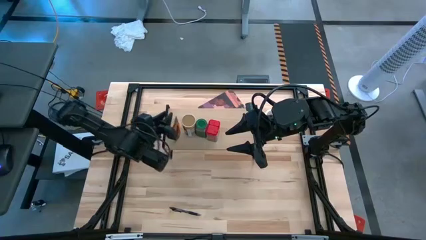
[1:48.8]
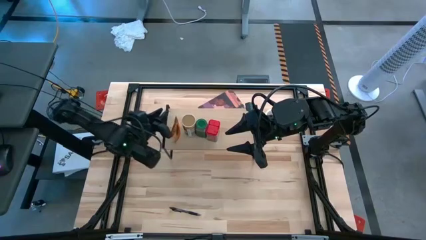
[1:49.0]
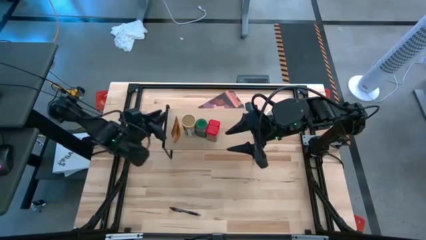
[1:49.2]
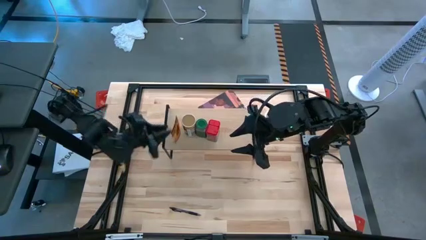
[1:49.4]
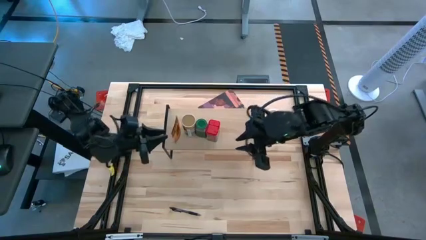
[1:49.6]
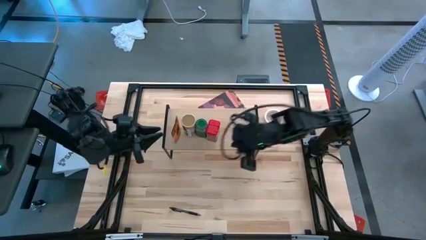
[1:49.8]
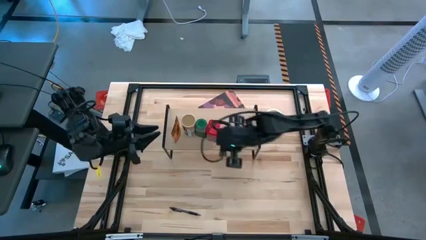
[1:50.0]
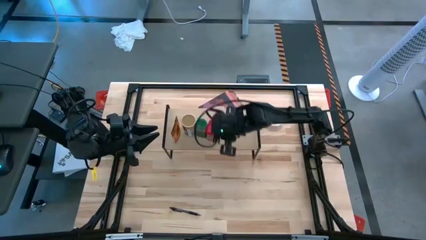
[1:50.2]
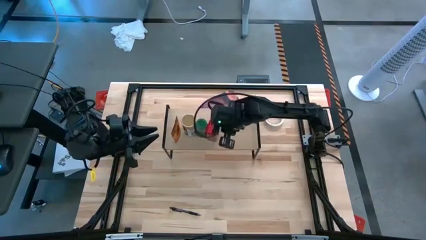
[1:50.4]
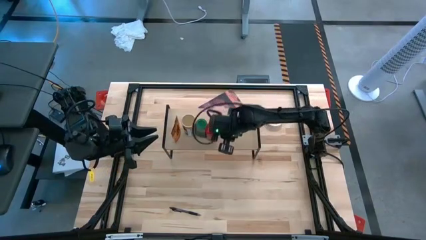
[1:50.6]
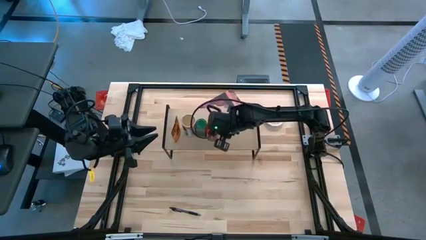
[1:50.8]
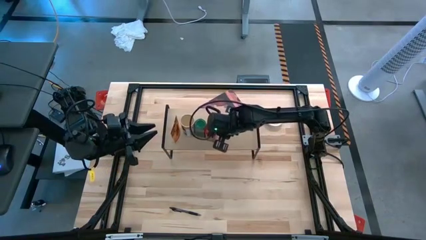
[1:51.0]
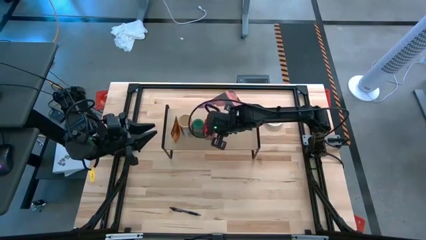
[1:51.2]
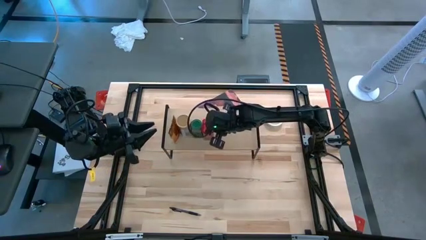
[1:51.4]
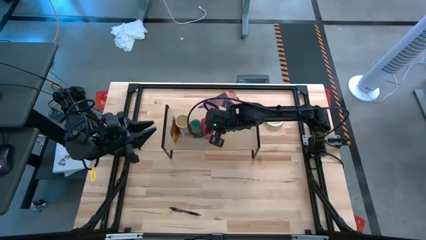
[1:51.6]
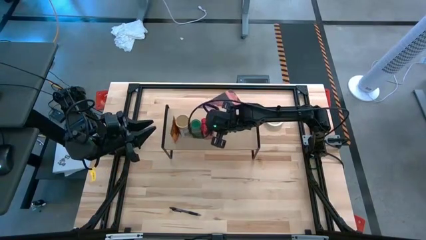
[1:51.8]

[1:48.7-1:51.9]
Task: Shelf spices
Adjust the seasoning bottles

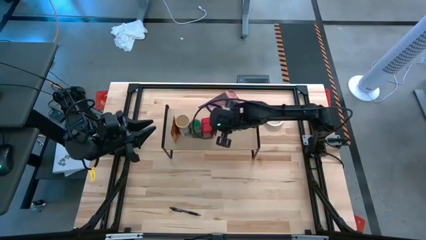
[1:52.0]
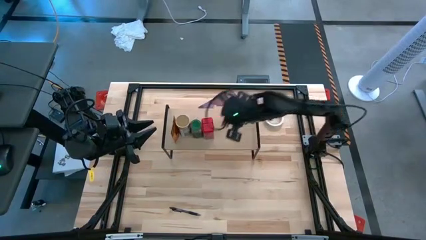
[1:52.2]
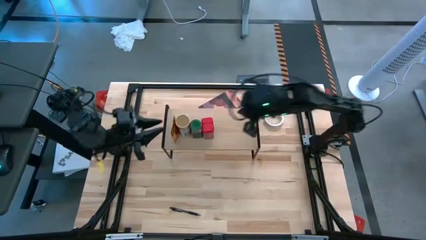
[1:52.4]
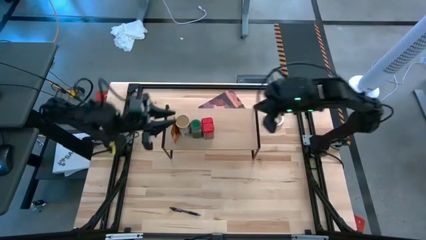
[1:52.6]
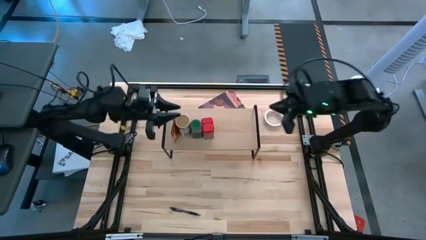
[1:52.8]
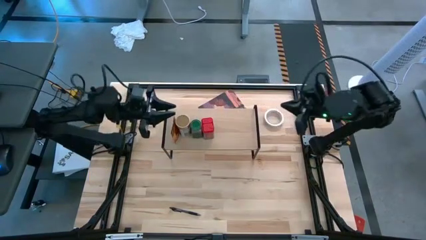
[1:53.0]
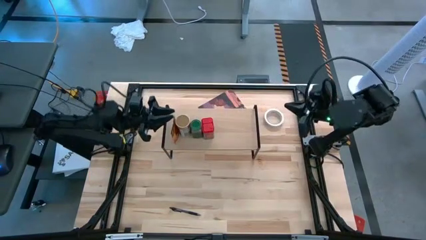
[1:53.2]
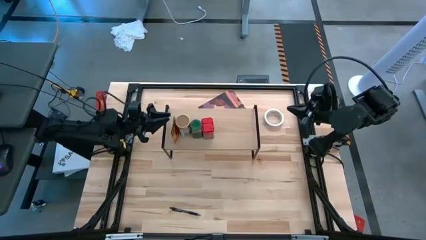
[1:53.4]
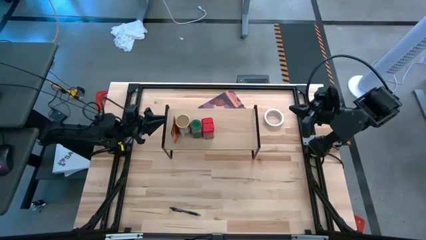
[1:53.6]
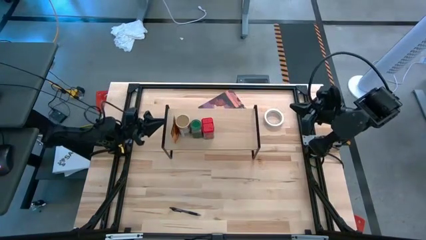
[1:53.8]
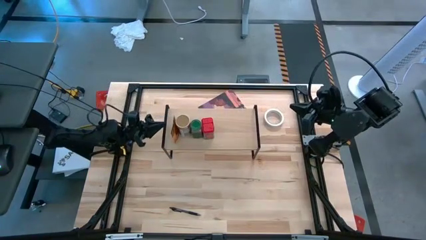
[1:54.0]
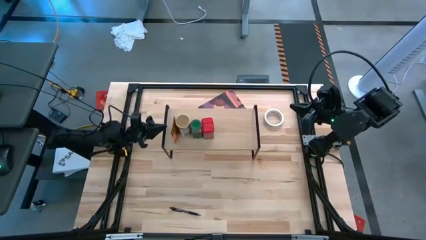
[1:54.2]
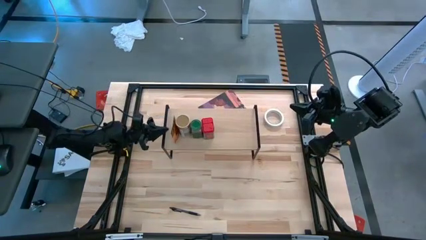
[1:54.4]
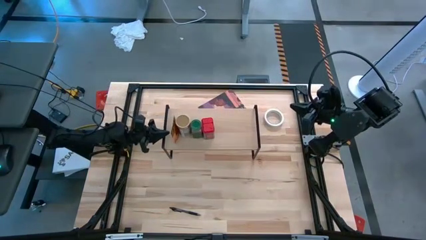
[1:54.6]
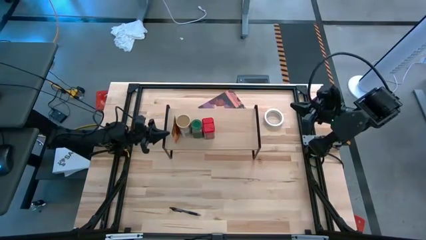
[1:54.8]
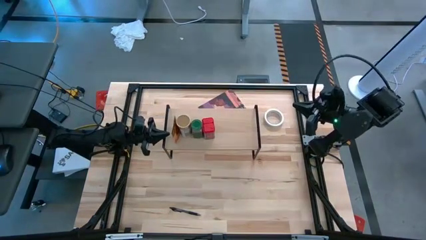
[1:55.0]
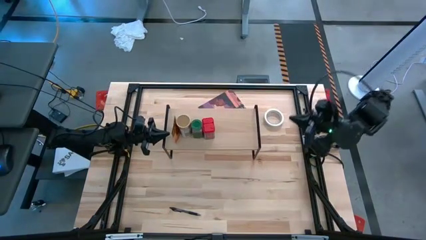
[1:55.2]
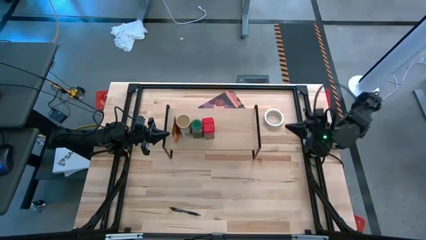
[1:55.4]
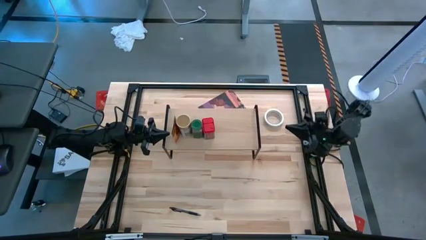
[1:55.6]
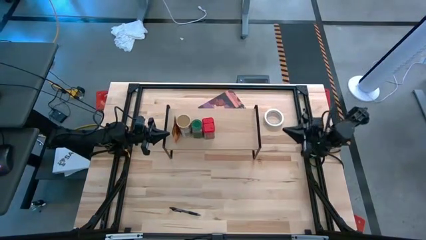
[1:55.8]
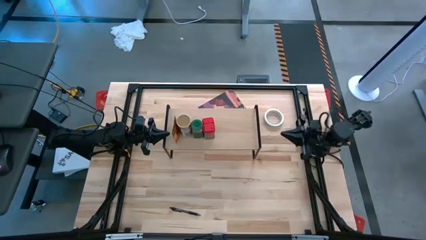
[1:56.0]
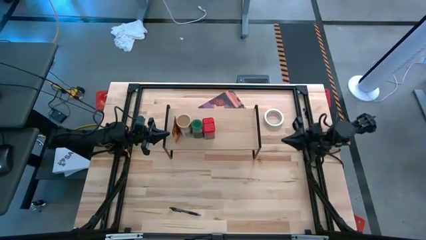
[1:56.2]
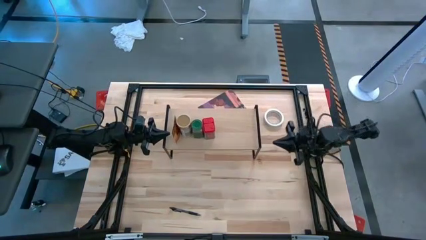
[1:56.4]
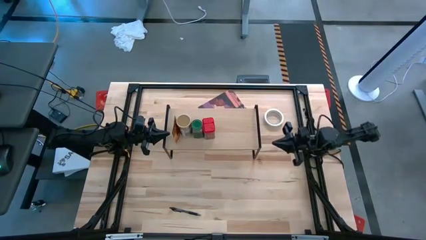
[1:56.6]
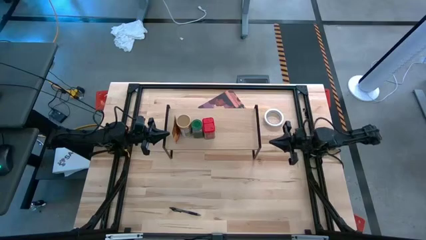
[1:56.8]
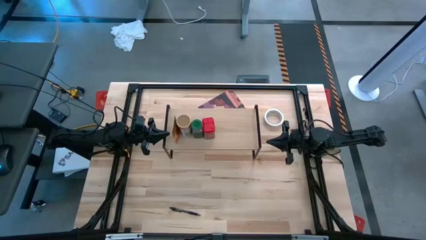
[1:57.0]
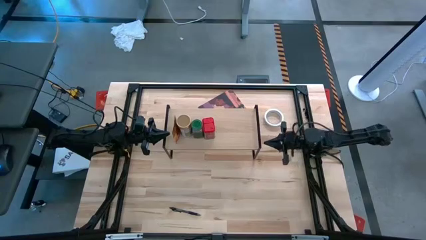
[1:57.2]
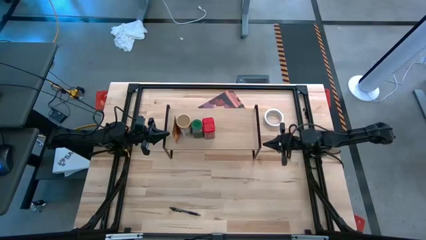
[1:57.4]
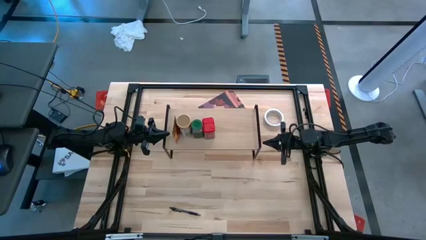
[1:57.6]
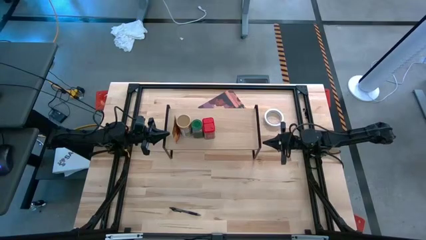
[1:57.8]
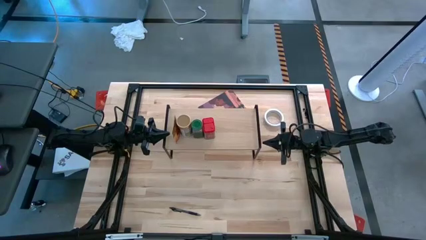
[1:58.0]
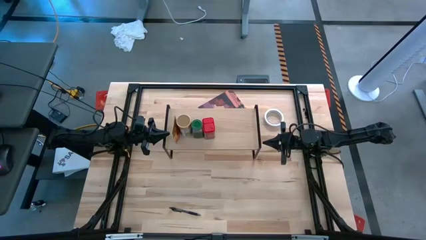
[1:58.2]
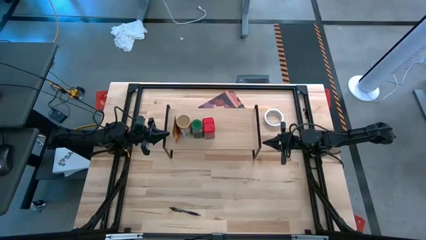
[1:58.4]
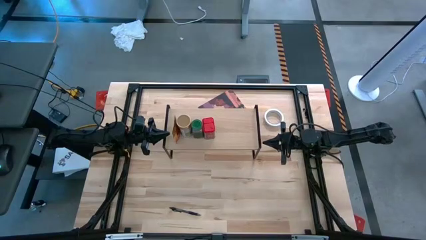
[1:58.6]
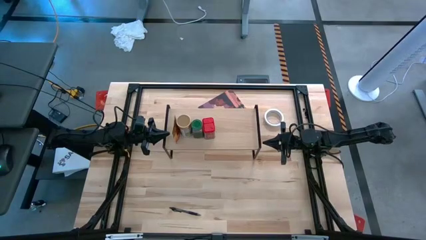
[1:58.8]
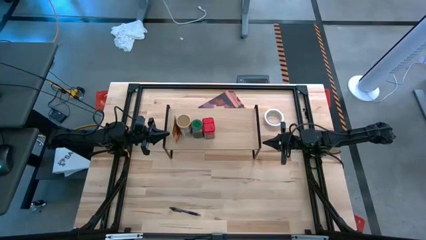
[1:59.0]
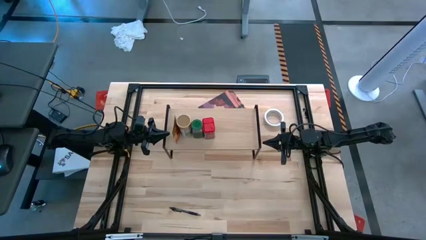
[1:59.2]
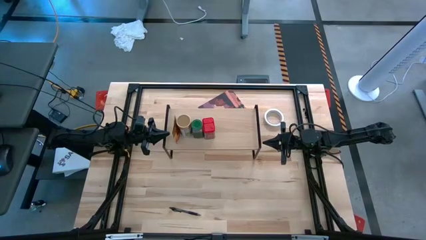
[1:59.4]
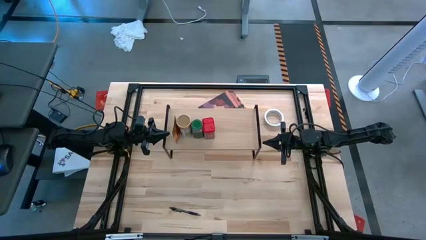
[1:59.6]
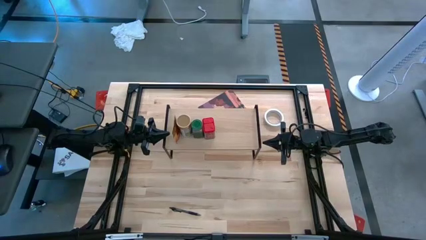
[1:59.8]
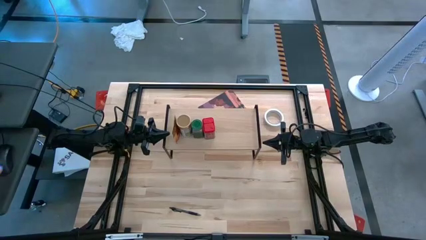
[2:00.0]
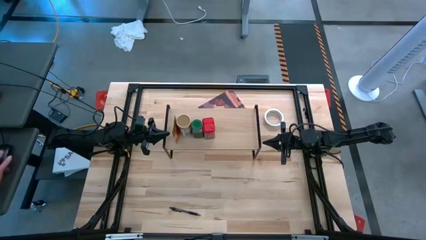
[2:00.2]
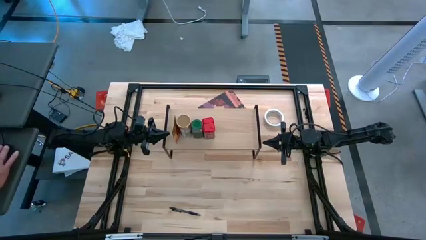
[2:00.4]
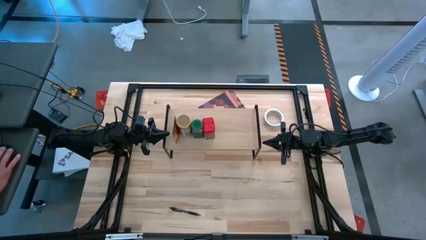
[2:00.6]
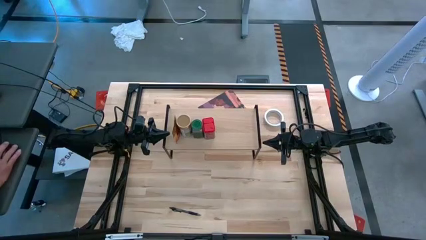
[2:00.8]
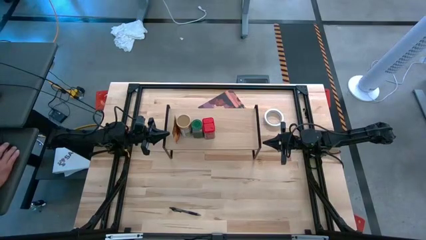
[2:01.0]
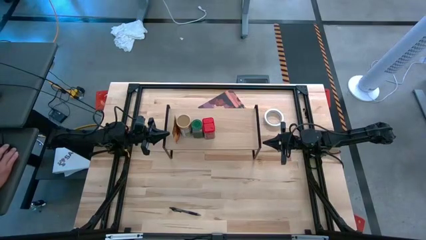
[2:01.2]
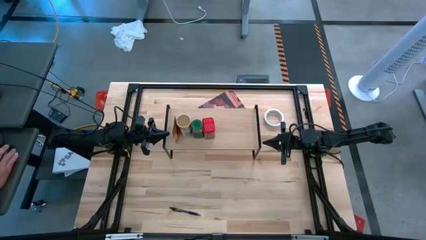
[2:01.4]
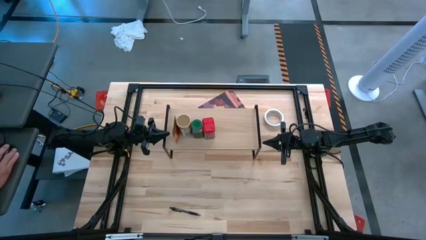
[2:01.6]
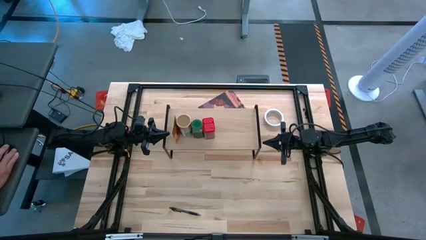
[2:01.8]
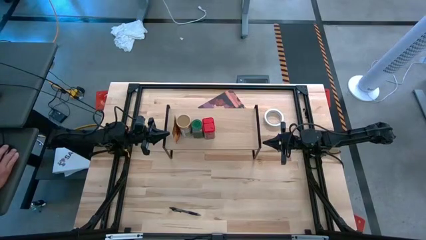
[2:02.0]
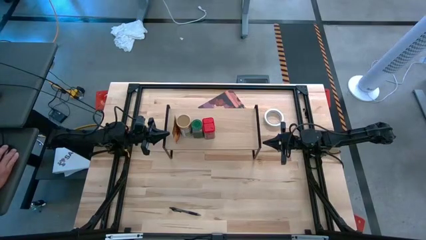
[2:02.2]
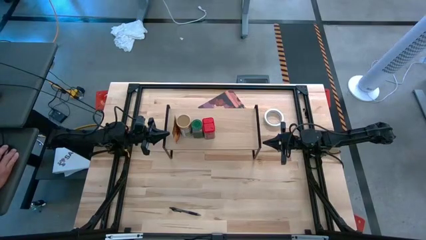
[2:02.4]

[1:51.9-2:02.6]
Return to Home Position

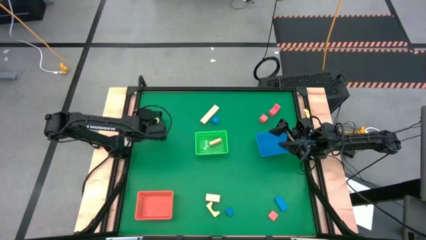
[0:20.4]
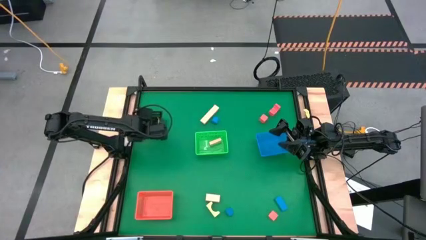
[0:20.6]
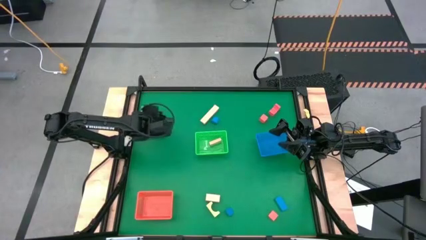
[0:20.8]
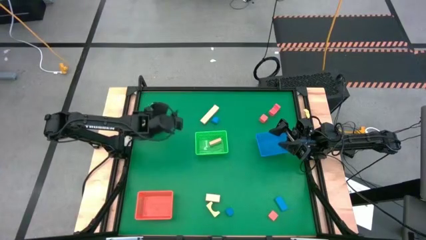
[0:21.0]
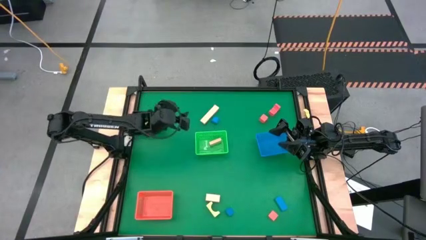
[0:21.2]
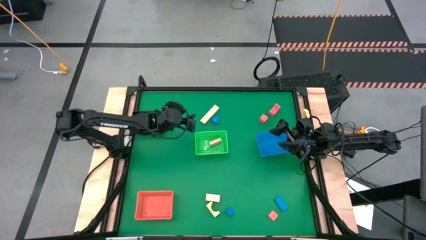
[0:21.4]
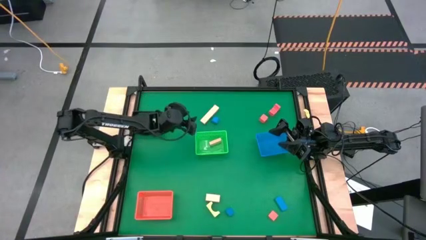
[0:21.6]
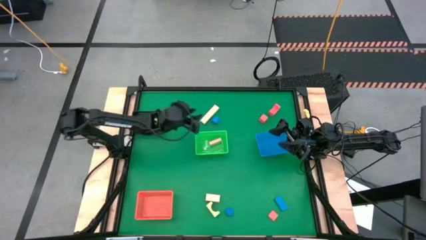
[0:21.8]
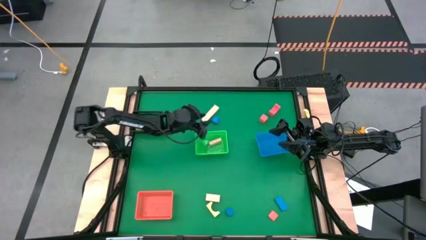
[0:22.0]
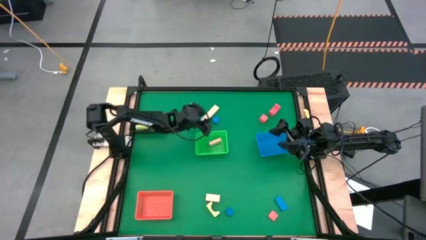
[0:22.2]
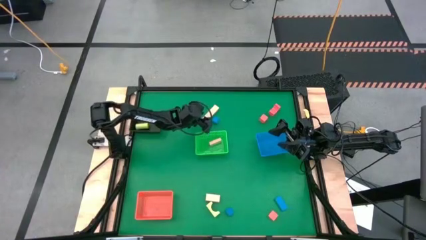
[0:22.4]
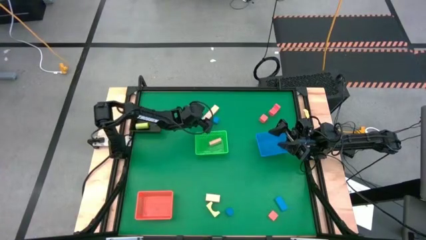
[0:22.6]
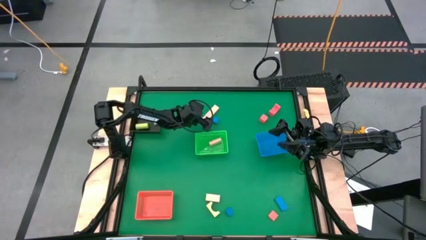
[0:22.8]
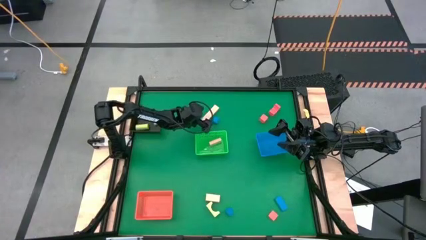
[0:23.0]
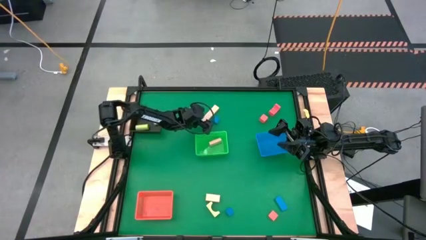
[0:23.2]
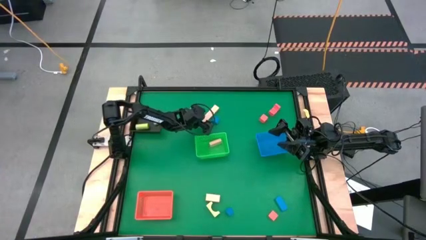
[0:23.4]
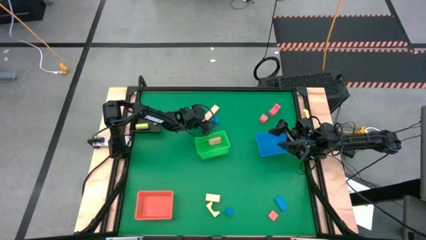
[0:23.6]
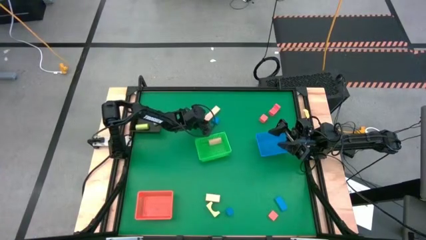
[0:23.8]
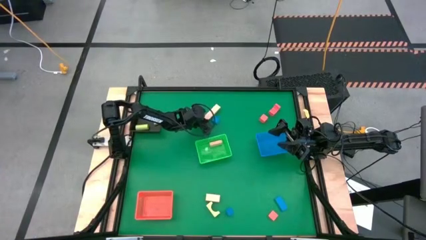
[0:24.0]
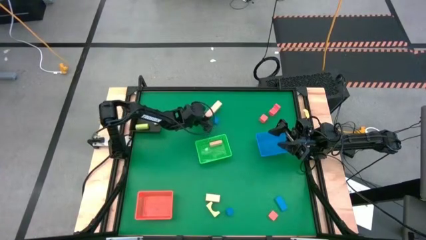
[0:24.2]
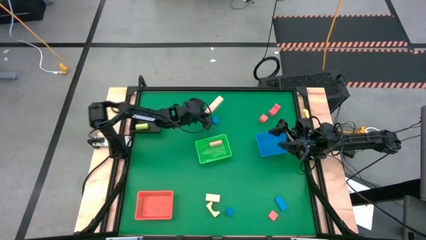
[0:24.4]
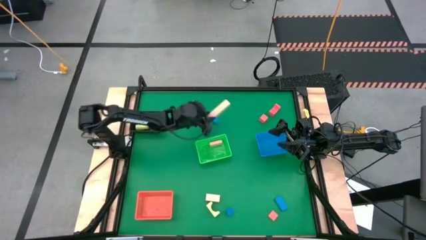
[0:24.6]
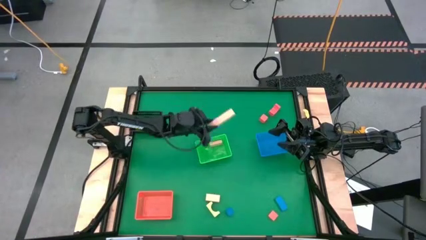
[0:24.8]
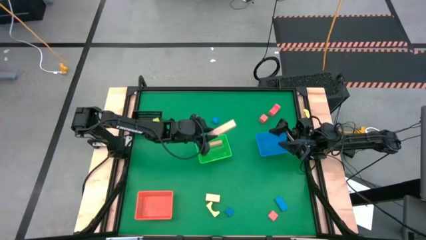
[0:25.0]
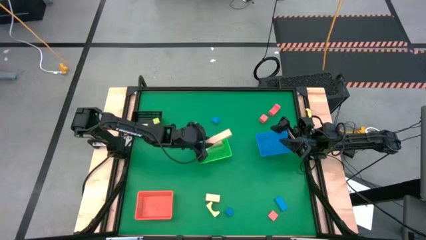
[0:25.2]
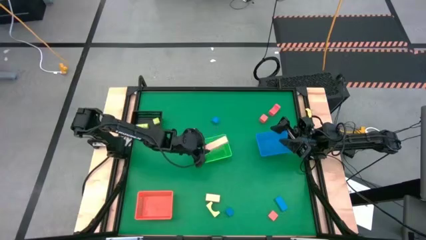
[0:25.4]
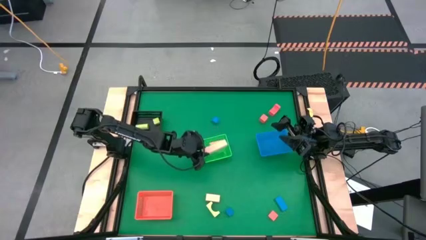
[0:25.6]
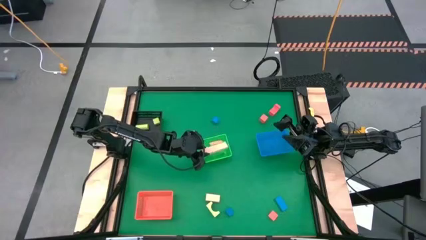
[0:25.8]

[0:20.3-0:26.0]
Task: Sort & place blocks by color
Put the top light brown block into the green bin
